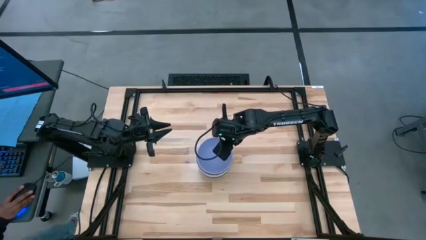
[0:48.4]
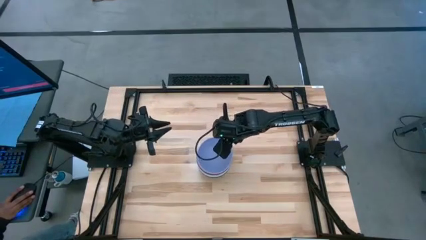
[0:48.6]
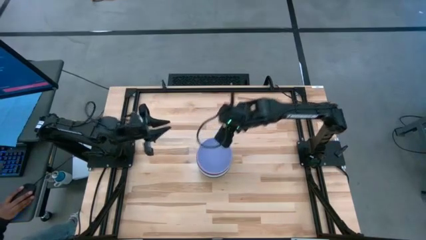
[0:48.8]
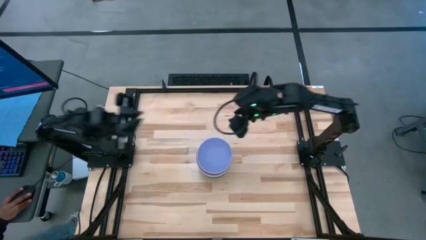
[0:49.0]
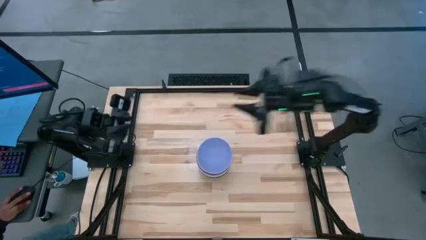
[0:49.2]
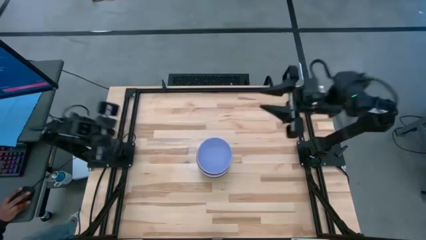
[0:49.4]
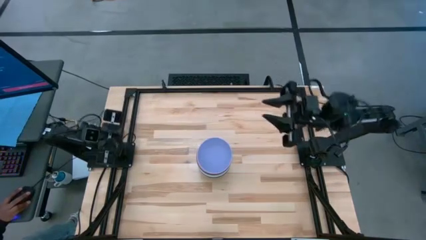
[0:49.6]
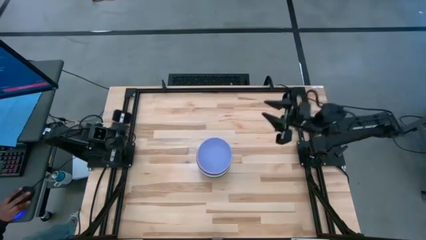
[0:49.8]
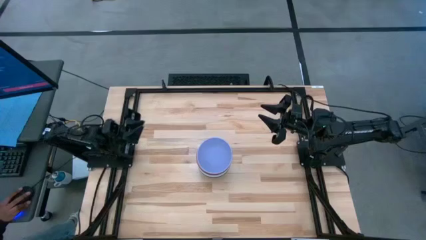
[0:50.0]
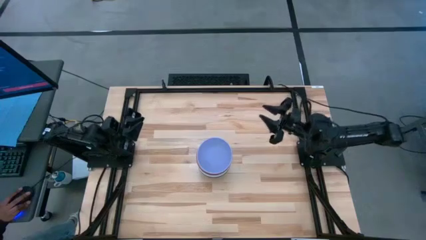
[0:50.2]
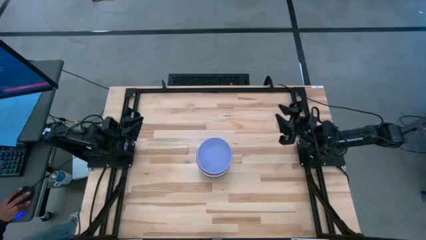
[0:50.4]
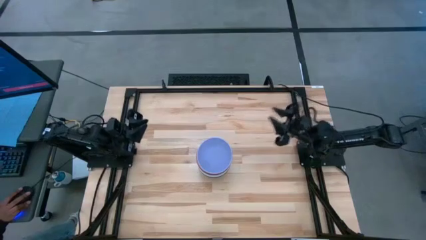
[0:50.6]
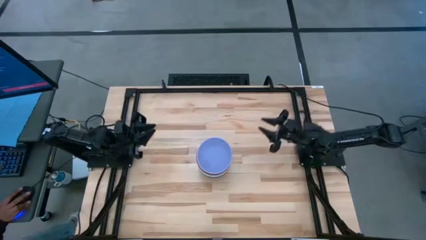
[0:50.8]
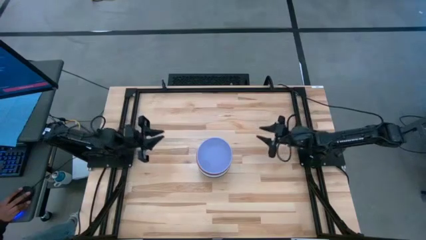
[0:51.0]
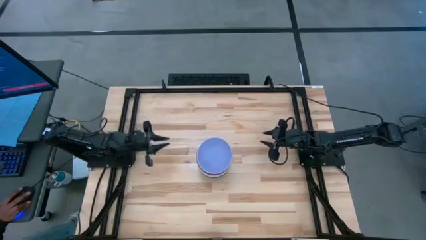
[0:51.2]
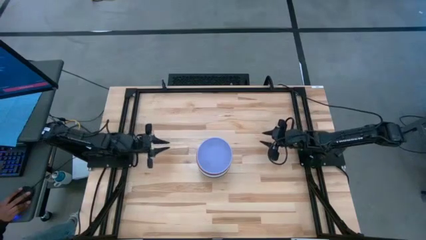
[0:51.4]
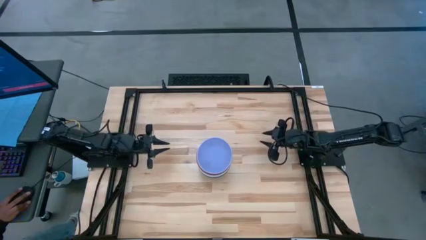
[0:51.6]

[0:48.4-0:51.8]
Task: Nest bowls inside each other
Return to Home Position

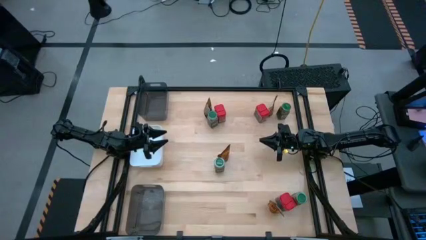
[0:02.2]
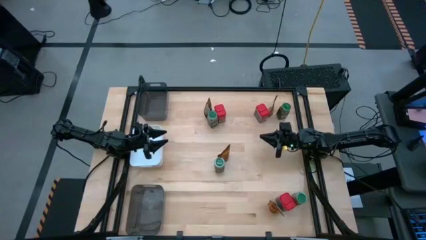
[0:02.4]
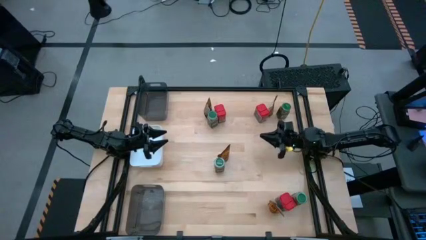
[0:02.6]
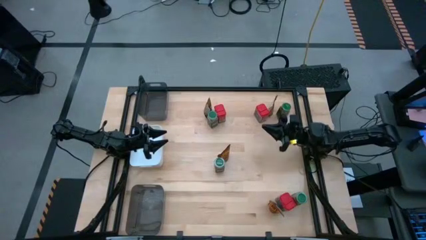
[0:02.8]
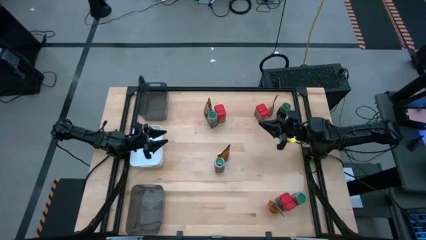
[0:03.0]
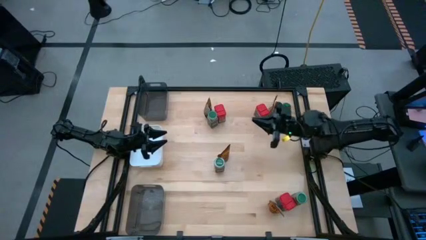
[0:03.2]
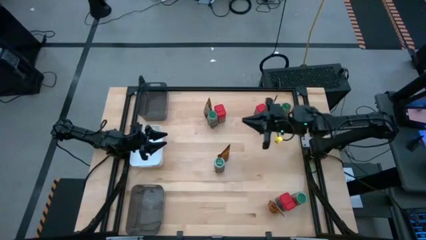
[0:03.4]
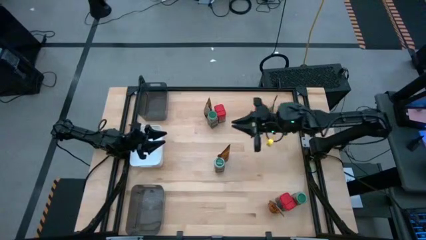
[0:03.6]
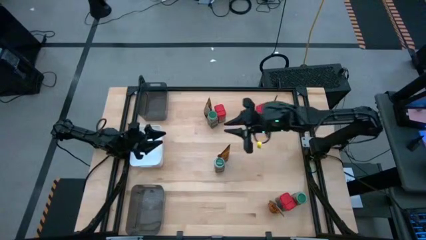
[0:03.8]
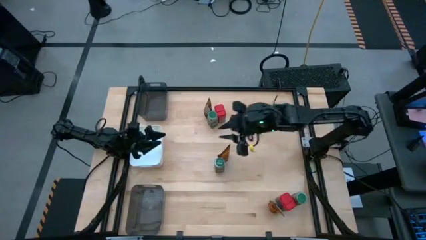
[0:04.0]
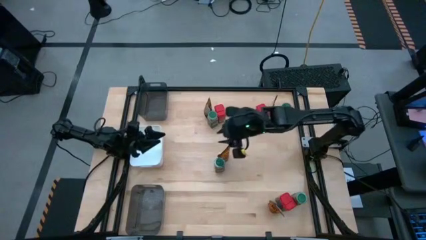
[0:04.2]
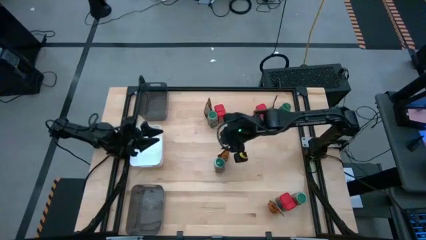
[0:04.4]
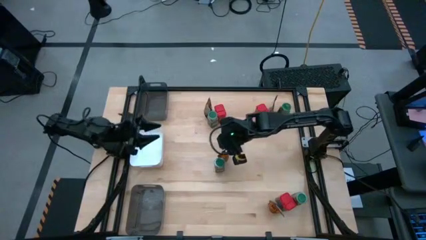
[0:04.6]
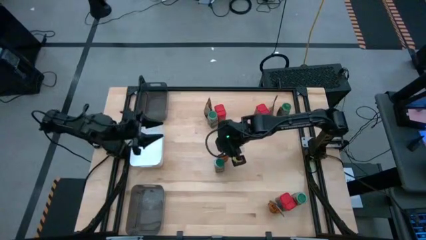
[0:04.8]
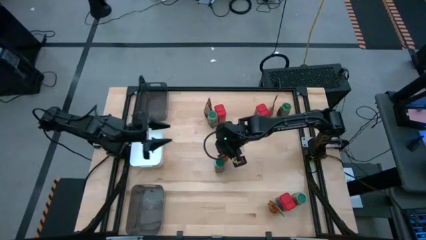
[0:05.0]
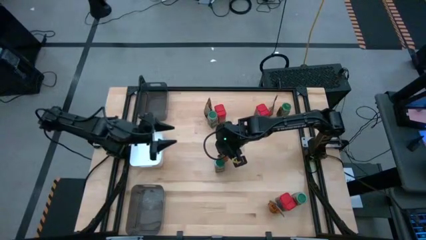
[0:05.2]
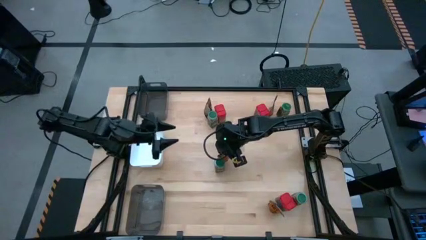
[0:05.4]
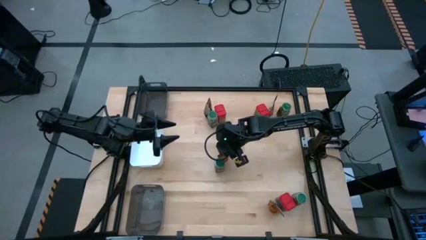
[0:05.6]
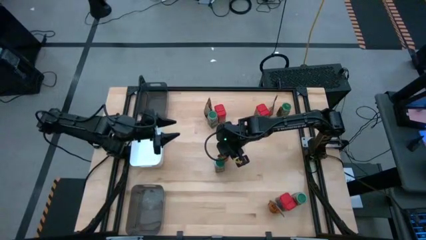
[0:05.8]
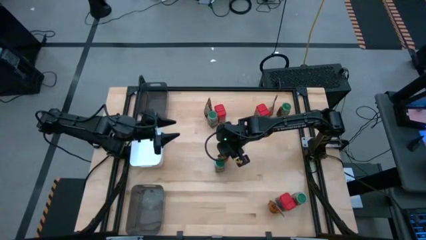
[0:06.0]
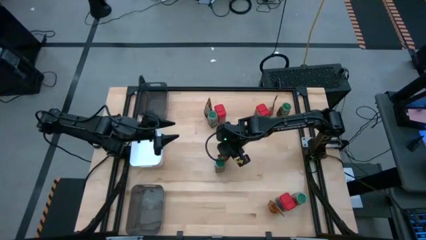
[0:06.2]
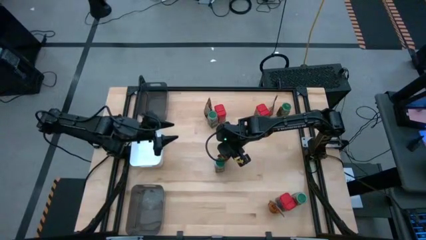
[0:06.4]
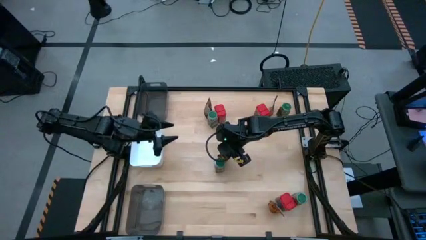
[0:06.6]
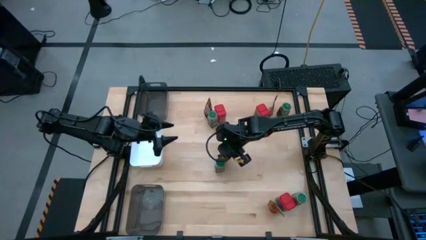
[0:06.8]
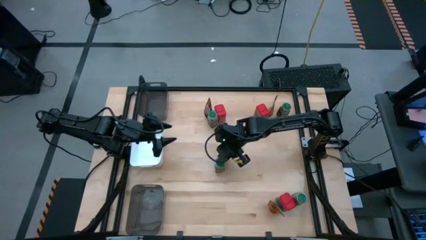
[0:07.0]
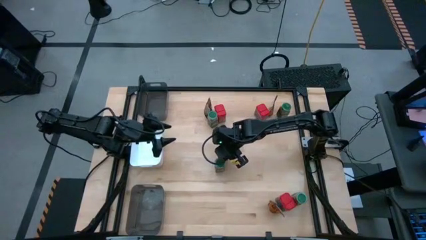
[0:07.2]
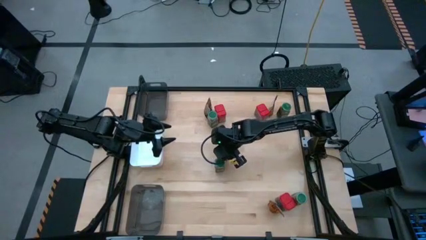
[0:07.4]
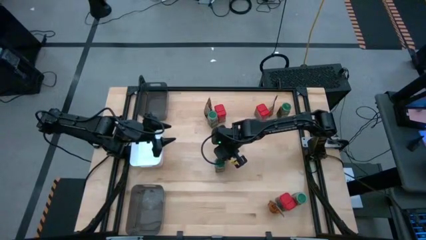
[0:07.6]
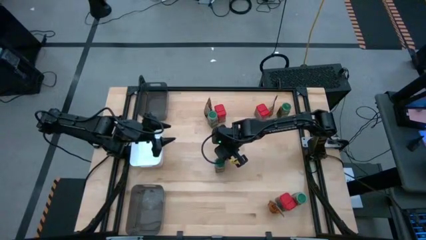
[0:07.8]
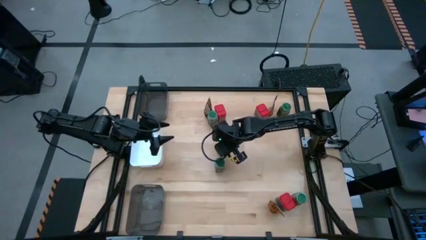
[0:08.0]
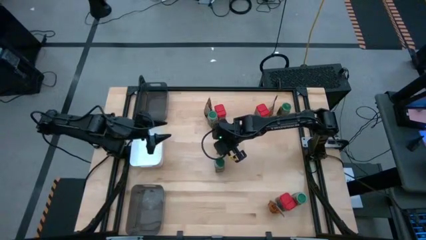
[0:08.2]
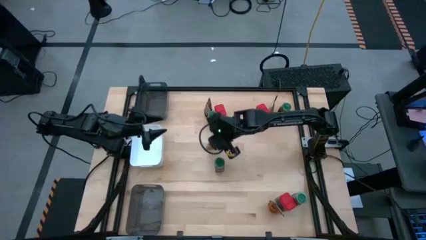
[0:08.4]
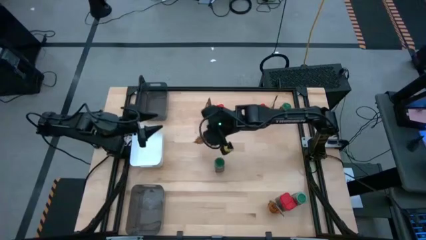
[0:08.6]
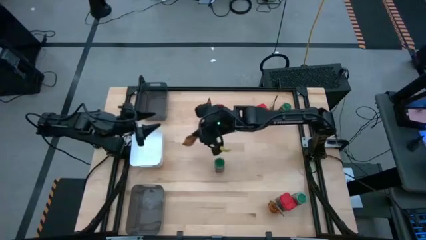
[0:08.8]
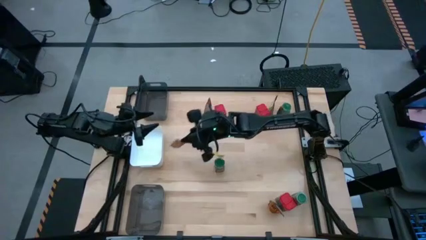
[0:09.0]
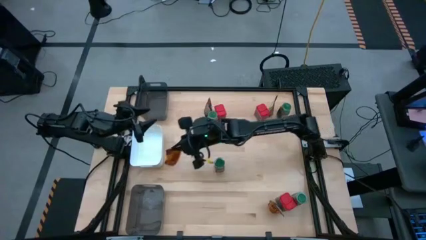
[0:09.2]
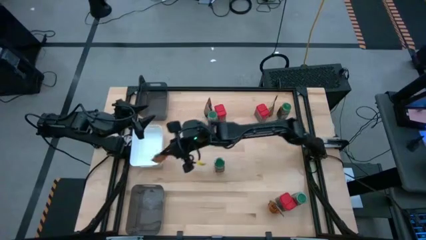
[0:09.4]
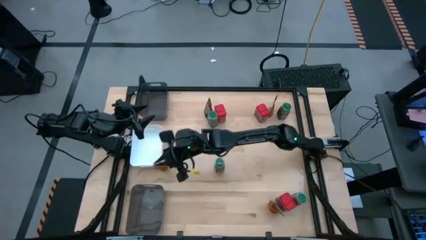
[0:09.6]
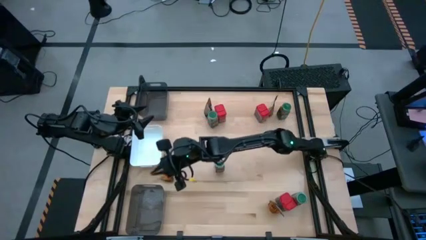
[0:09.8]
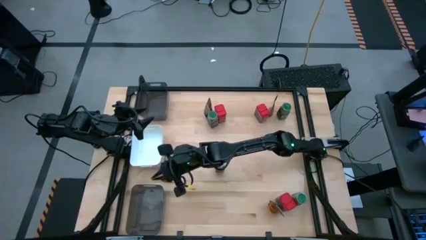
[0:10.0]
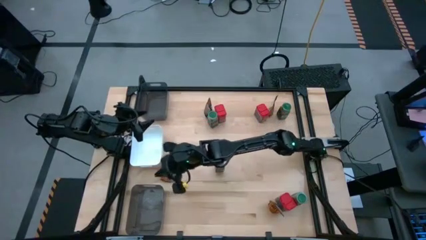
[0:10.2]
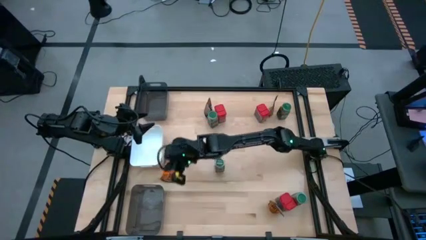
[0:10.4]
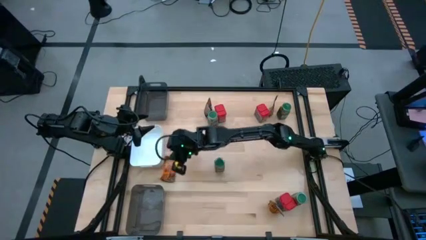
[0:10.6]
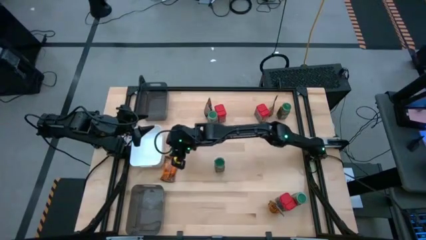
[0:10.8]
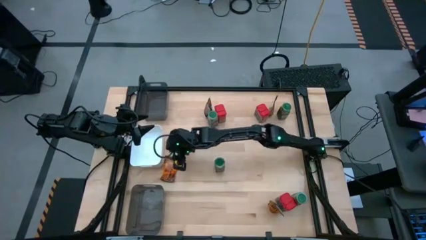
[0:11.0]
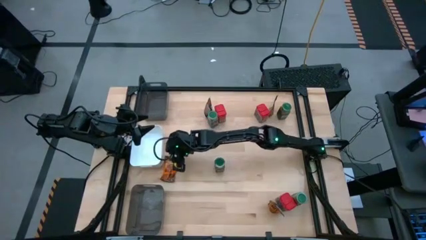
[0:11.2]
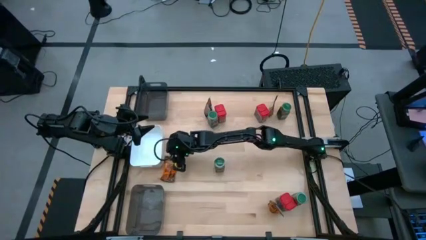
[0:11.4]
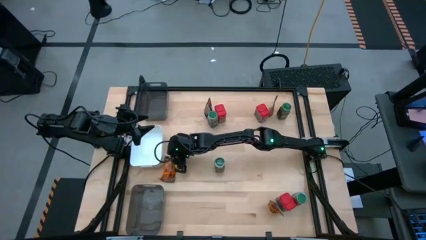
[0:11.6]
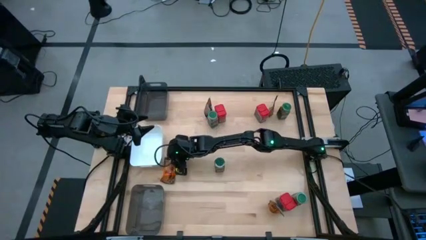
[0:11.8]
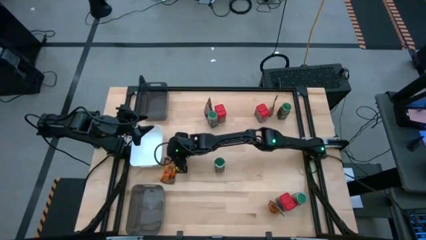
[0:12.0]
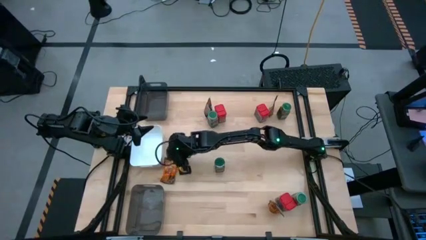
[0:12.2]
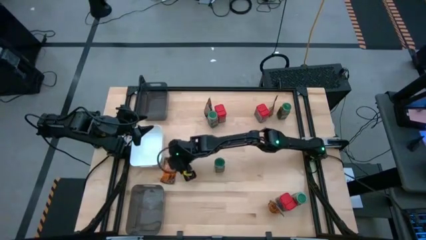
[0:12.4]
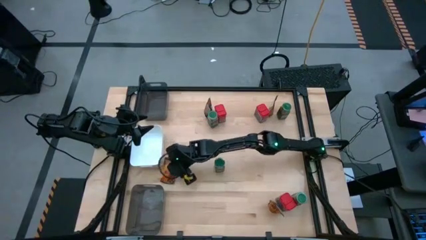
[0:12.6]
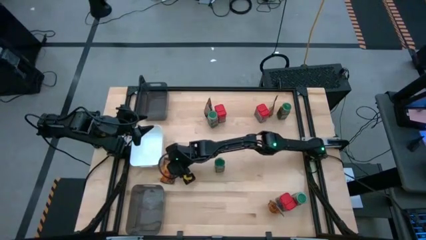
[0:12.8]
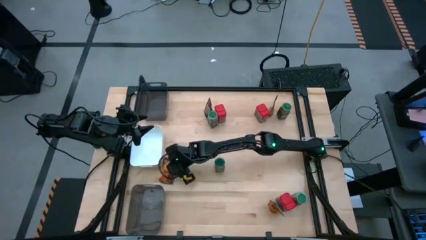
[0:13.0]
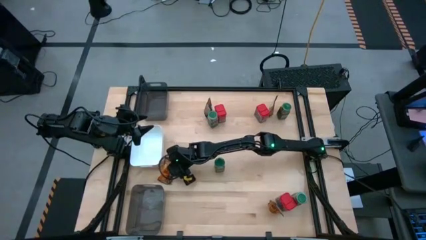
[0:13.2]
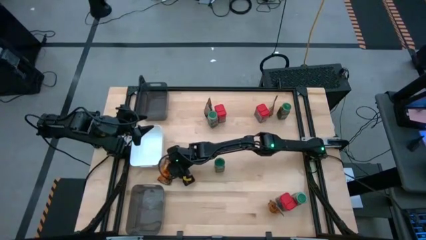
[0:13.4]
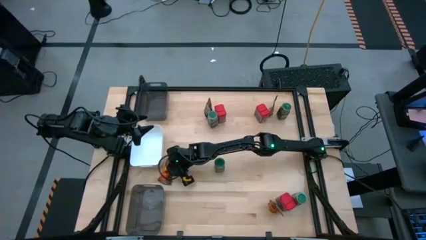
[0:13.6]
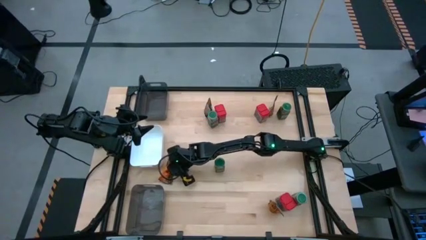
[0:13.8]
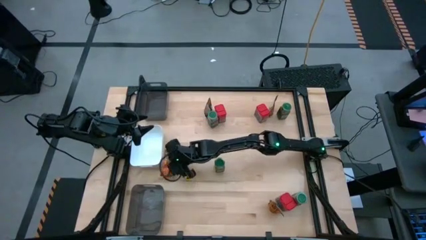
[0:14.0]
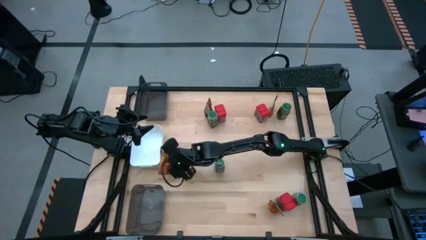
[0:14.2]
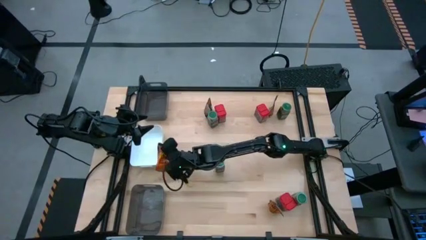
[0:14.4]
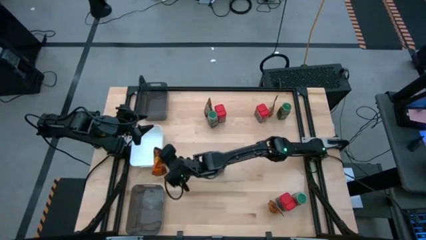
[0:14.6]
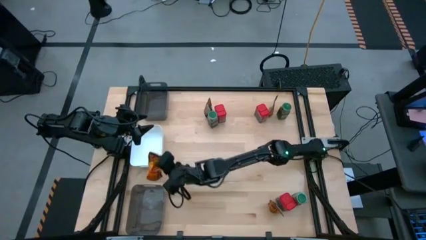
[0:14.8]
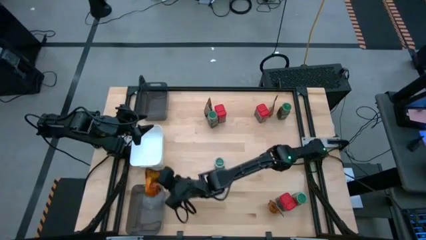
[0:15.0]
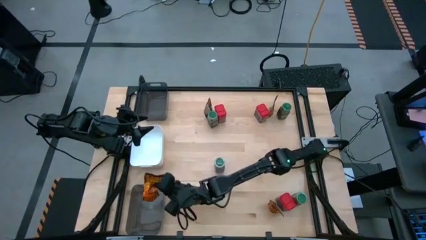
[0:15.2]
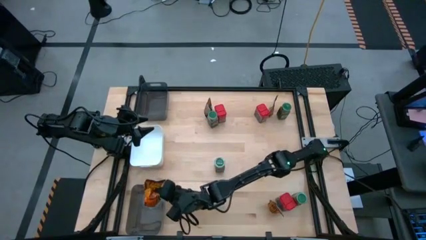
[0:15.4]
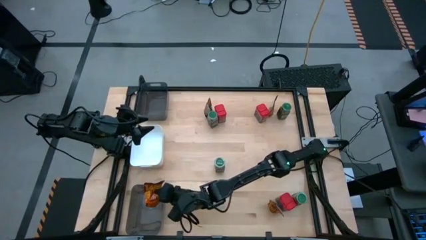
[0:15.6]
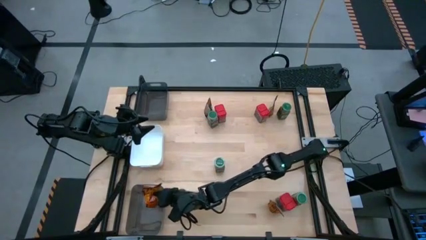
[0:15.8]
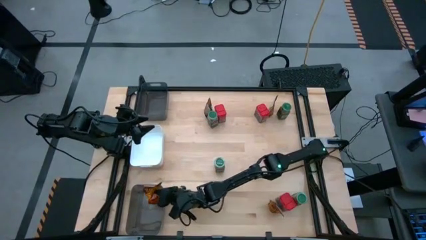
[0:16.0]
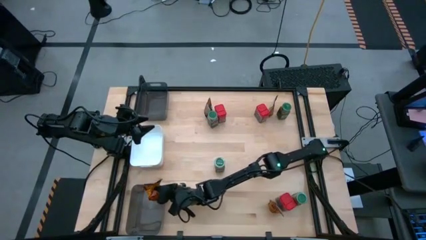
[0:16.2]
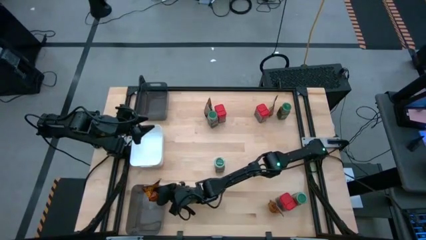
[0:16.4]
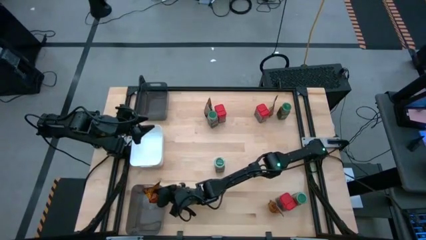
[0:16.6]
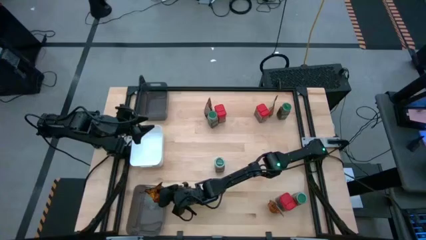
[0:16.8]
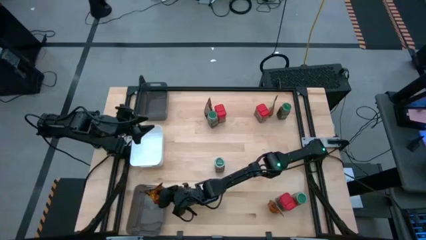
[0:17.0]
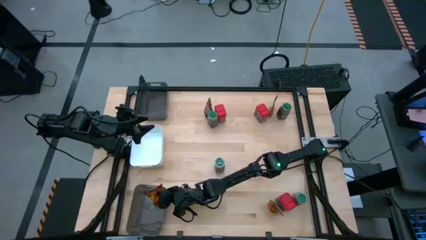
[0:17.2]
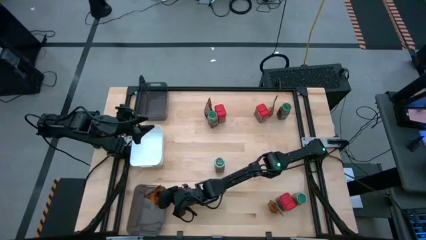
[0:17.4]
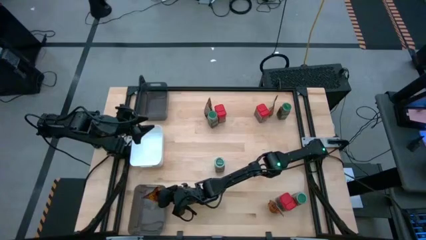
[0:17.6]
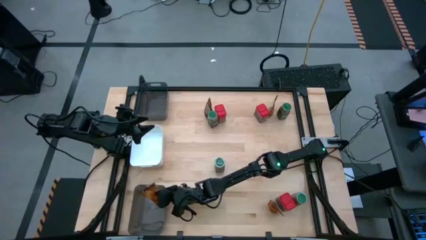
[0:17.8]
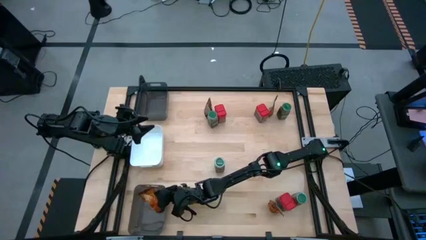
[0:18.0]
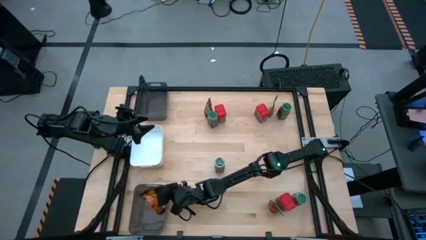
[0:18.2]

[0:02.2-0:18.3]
Task: Sort spices by type
Put the orange seasoning bag into the bottom black bin
